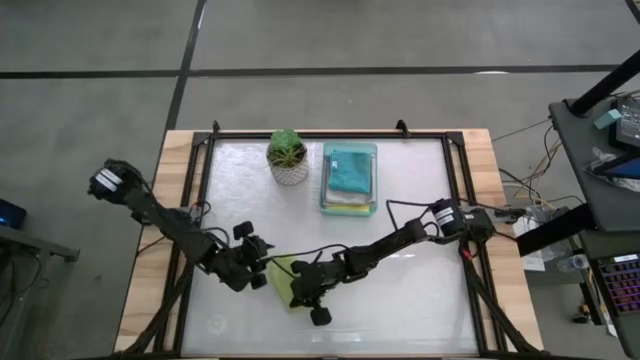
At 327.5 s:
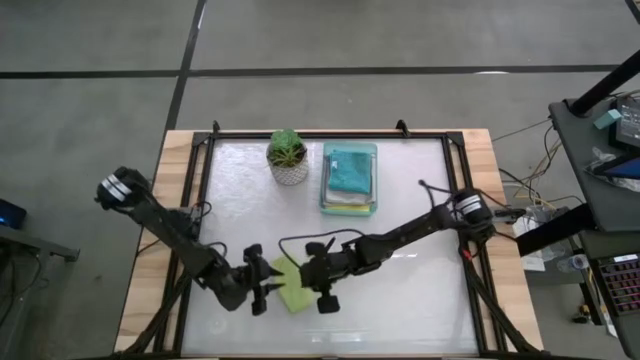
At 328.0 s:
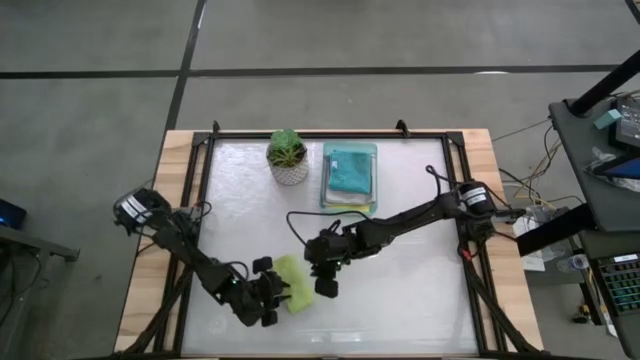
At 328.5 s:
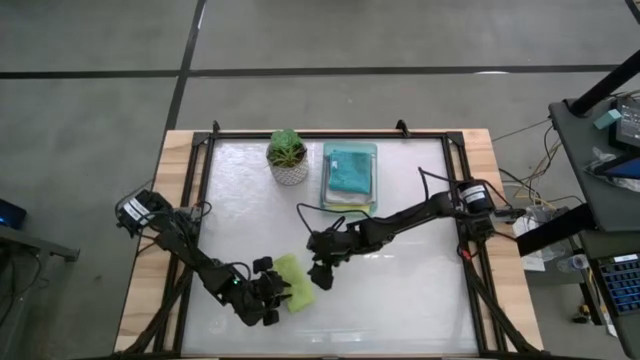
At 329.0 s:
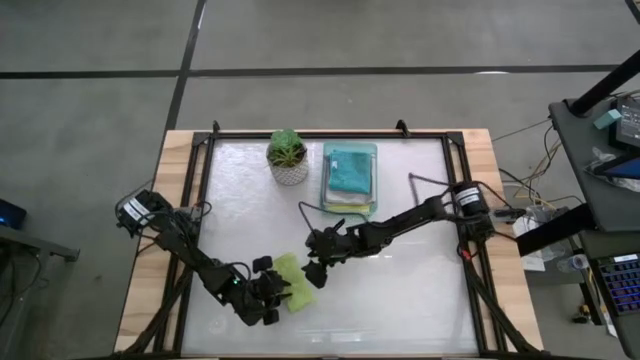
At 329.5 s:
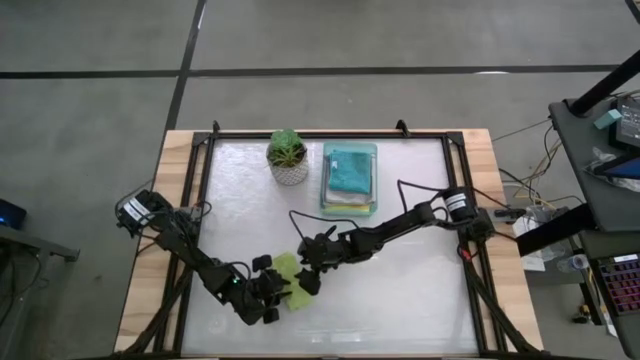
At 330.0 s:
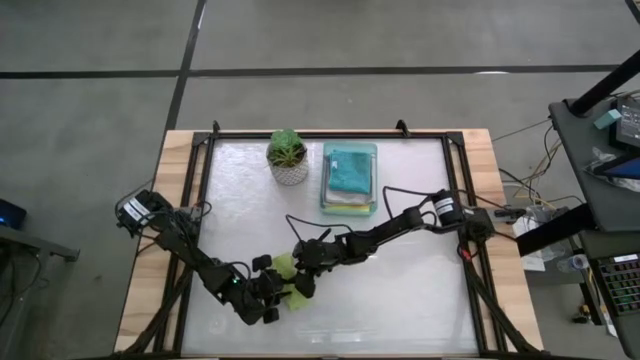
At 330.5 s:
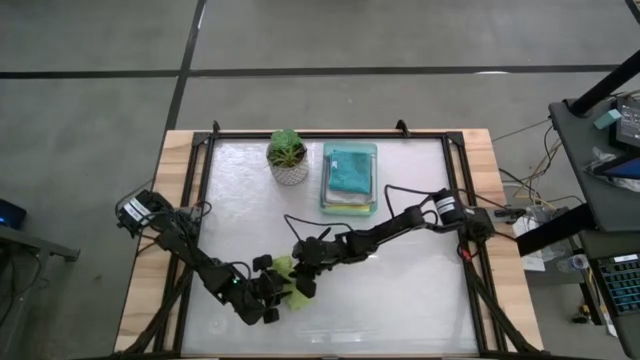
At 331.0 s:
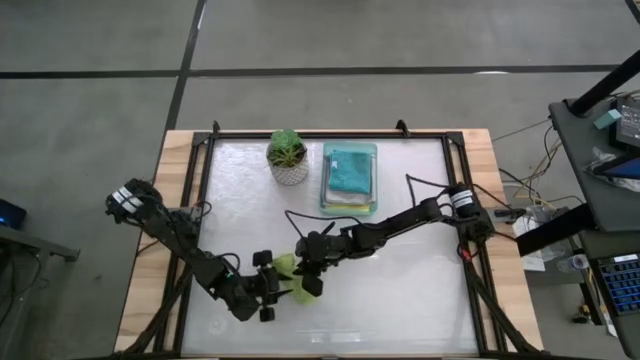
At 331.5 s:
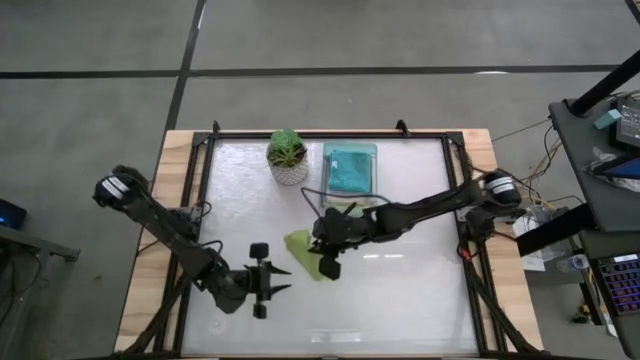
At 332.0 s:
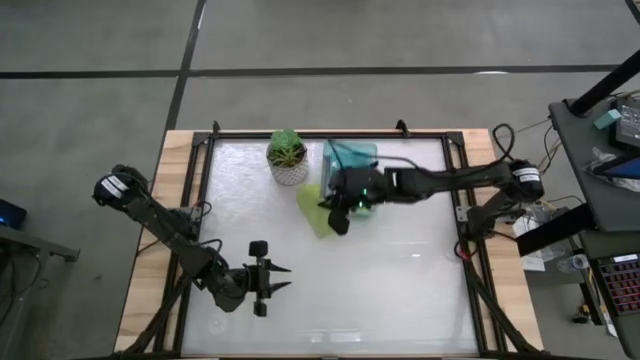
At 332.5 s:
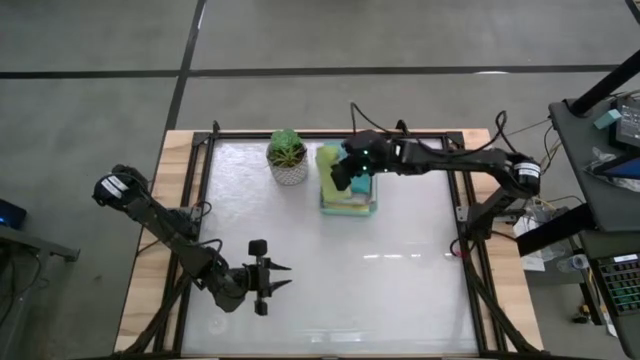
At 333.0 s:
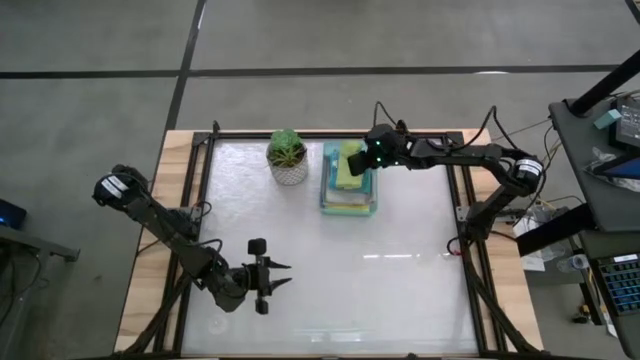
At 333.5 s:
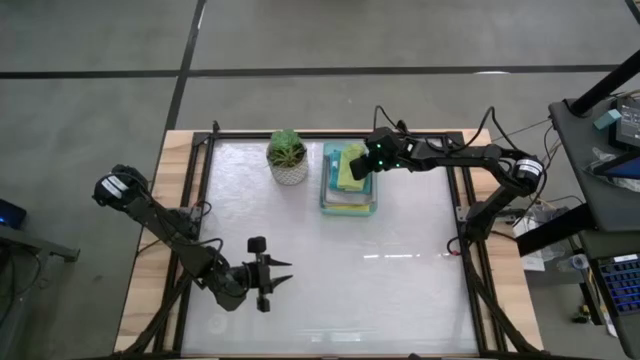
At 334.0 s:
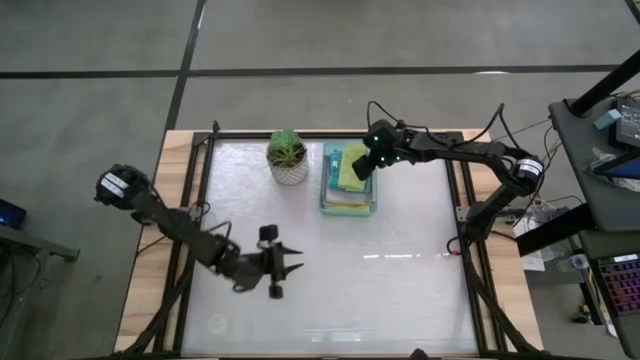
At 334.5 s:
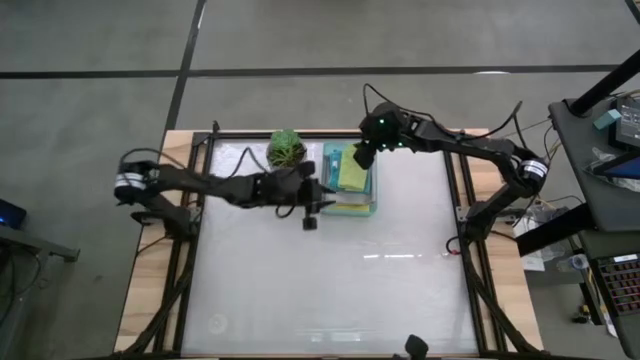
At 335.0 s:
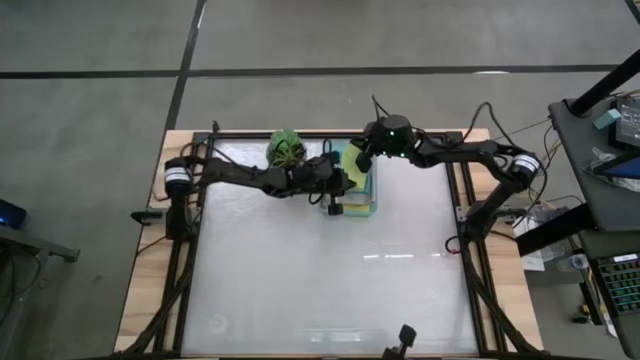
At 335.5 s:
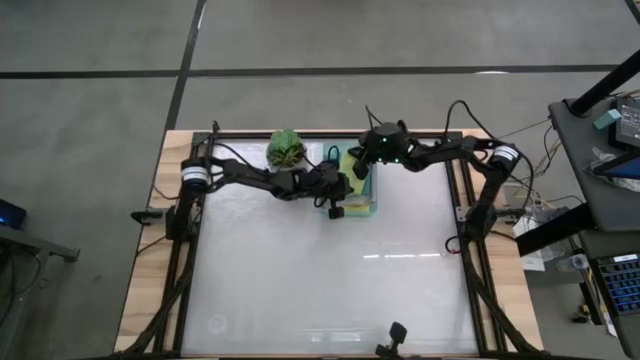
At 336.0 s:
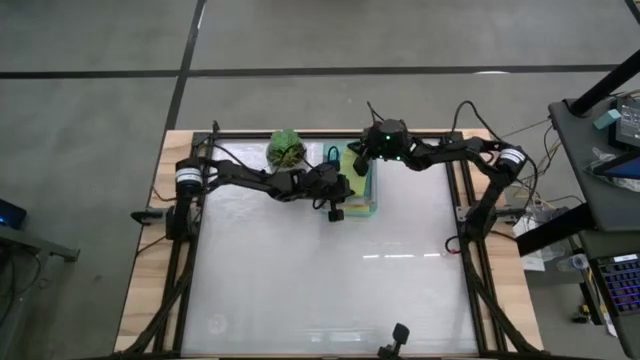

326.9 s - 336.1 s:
Task: Fold microfiber towels
Put the folded green microfiber cloth into the blue bin

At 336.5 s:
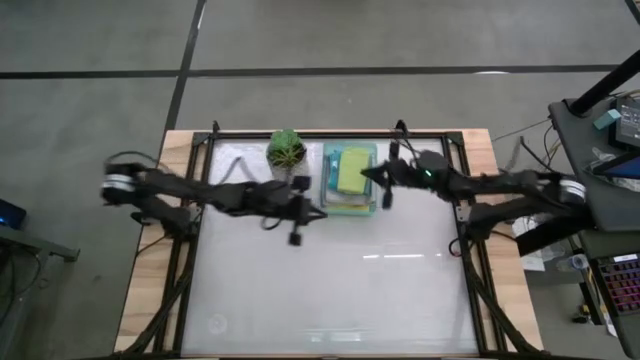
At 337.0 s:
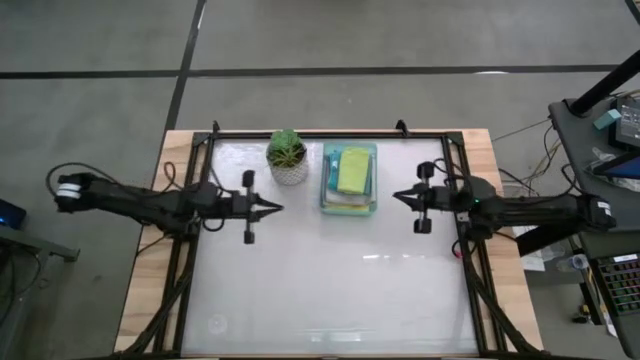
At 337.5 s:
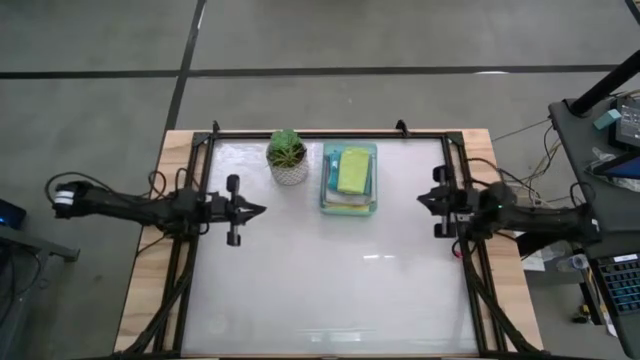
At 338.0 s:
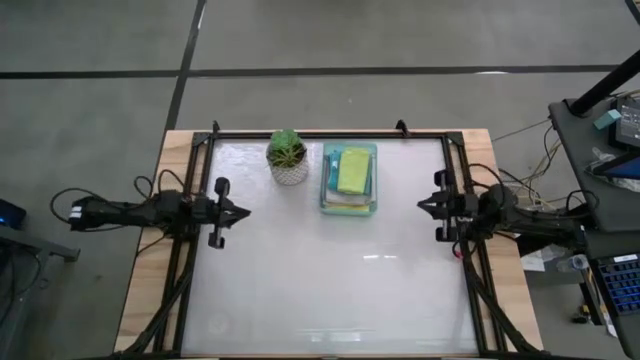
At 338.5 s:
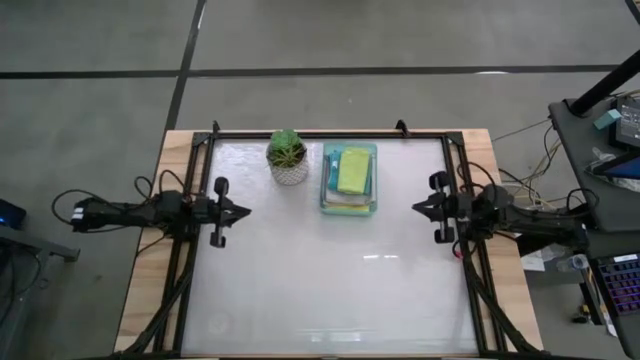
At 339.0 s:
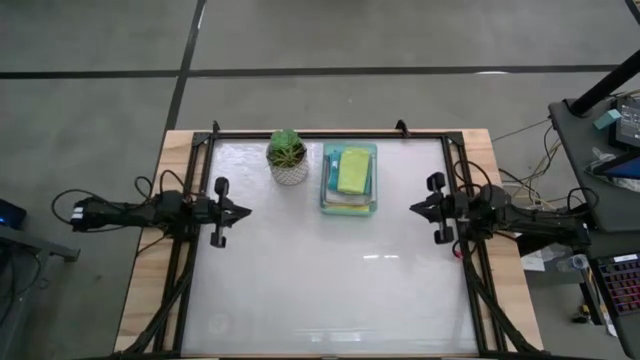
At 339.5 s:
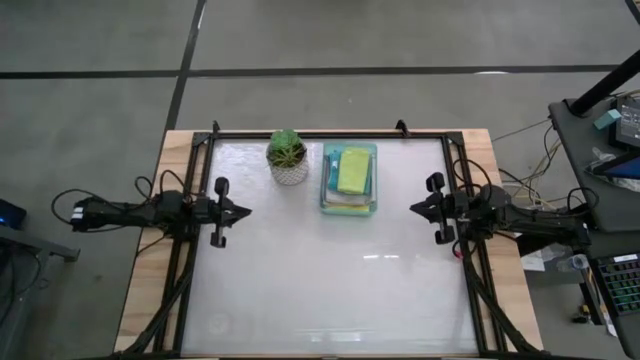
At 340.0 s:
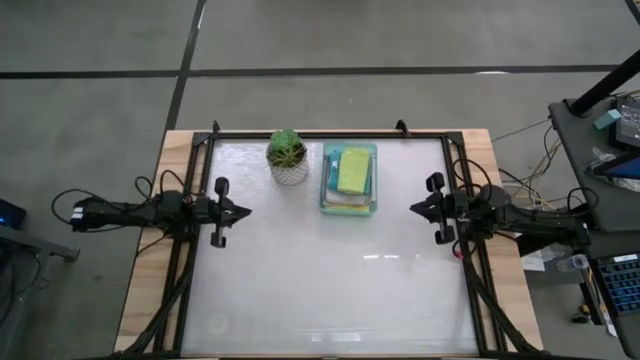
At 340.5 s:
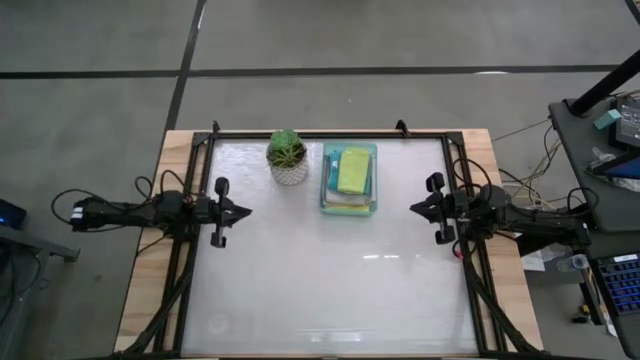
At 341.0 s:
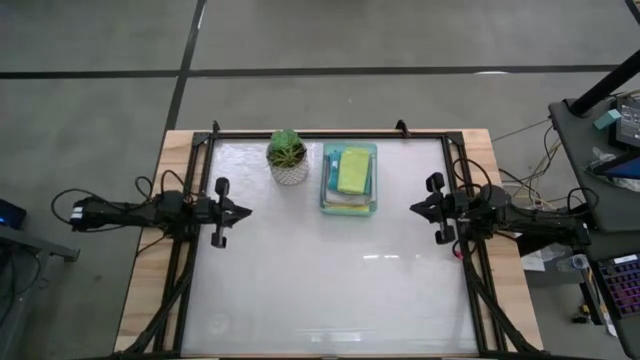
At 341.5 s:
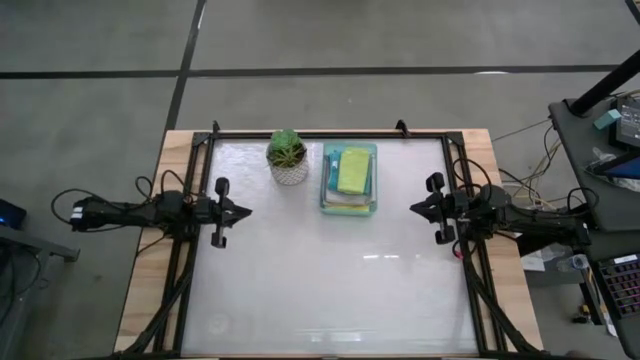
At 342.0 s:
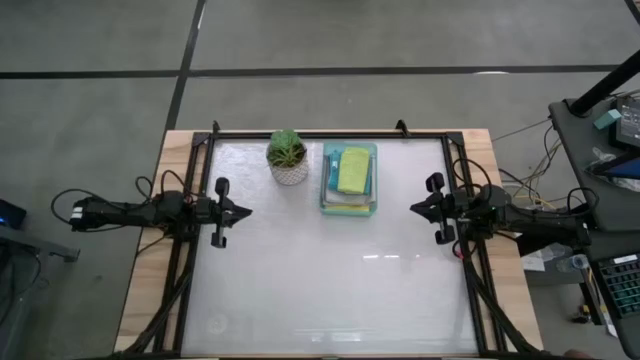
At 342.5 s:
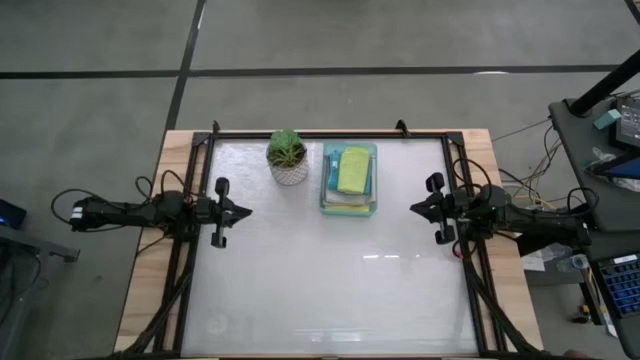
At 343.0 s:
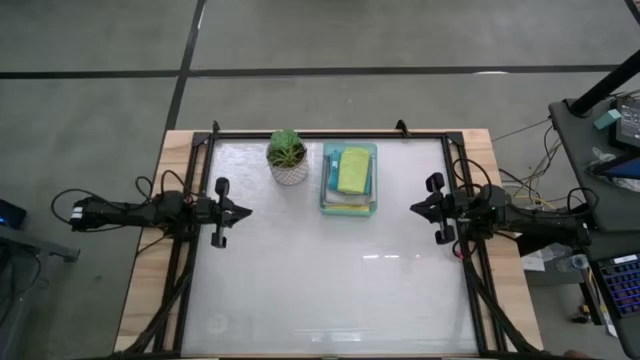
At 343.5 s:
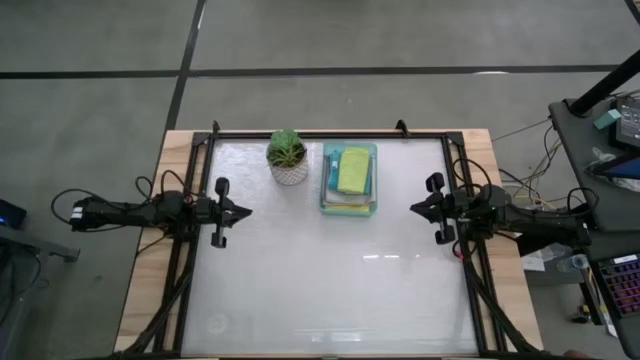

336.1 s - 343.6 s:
Return to Home Position

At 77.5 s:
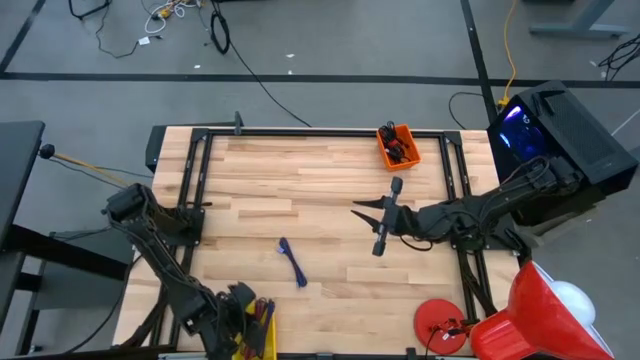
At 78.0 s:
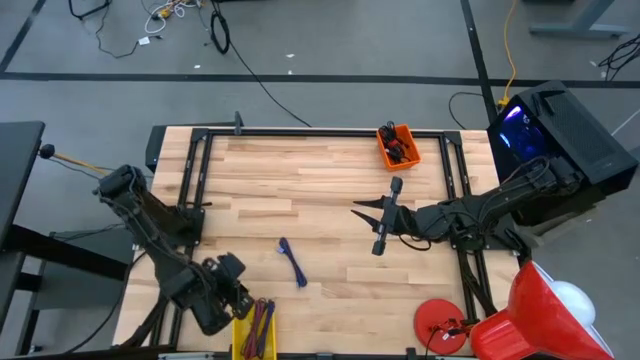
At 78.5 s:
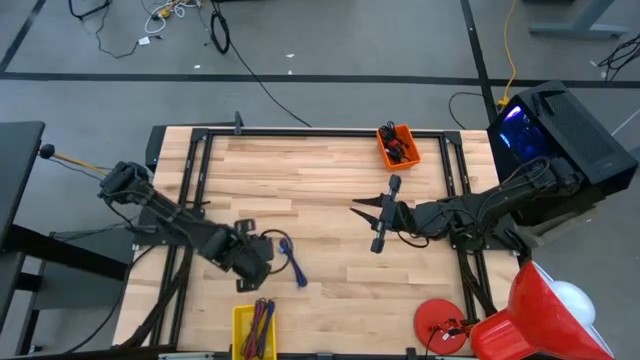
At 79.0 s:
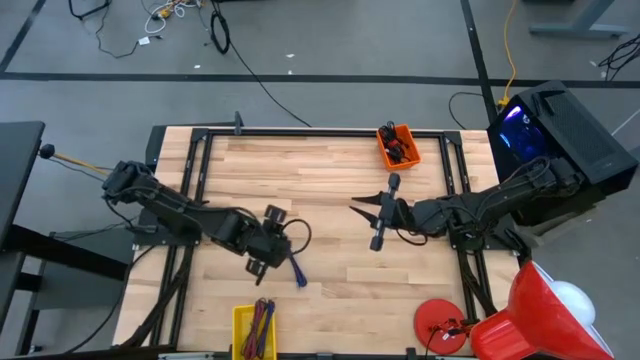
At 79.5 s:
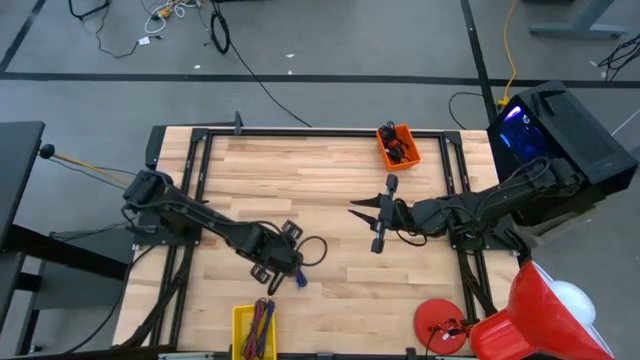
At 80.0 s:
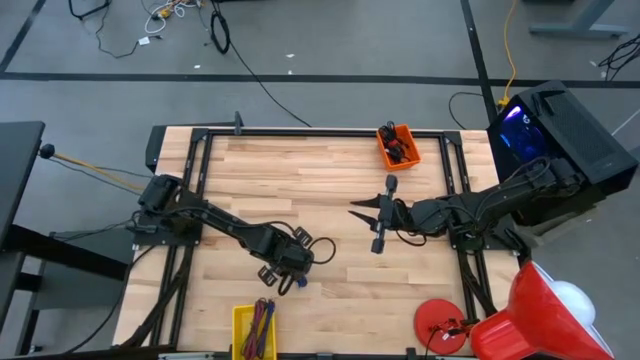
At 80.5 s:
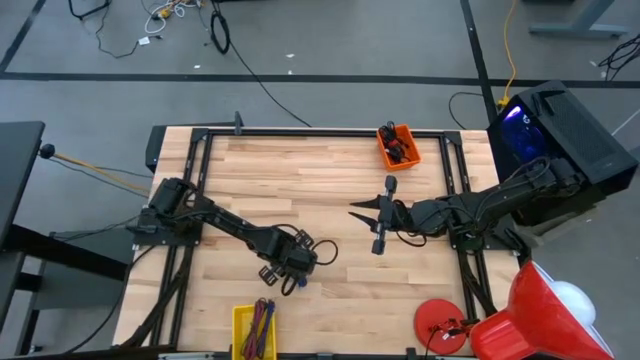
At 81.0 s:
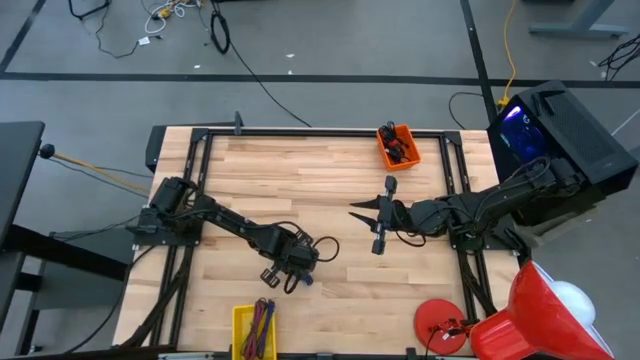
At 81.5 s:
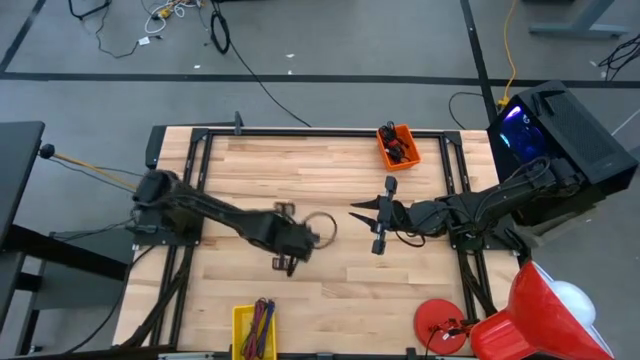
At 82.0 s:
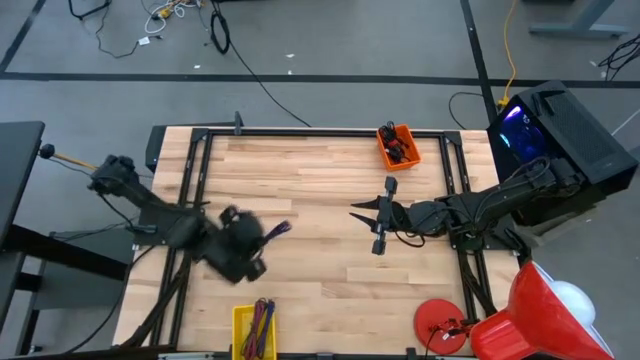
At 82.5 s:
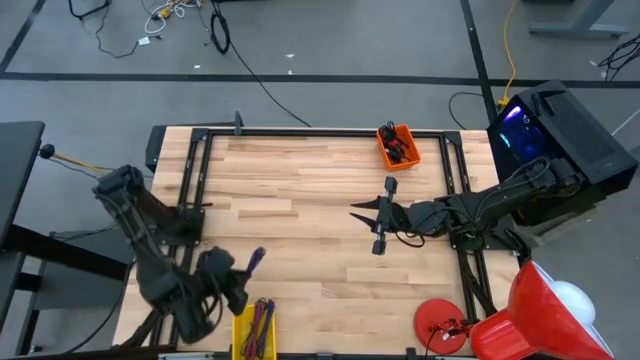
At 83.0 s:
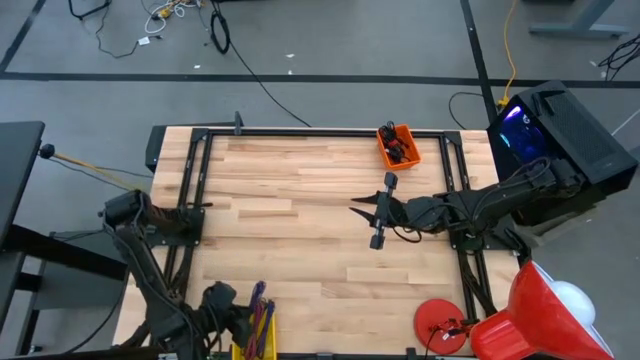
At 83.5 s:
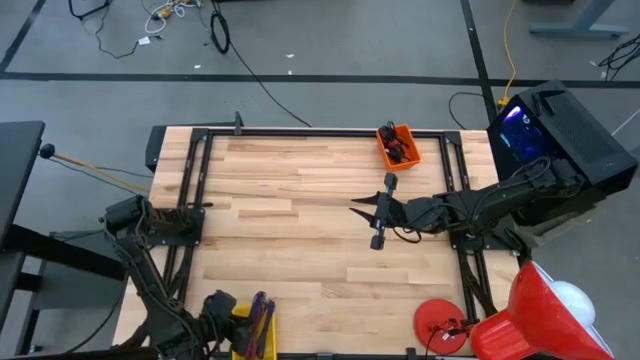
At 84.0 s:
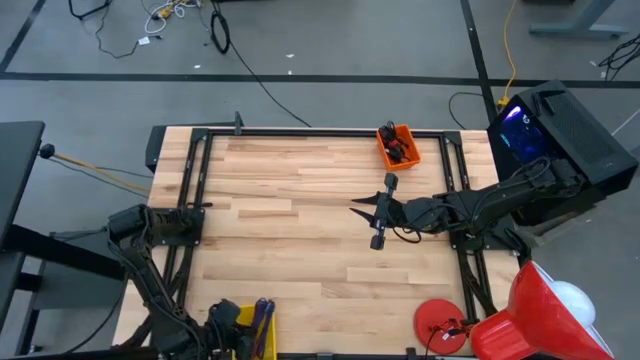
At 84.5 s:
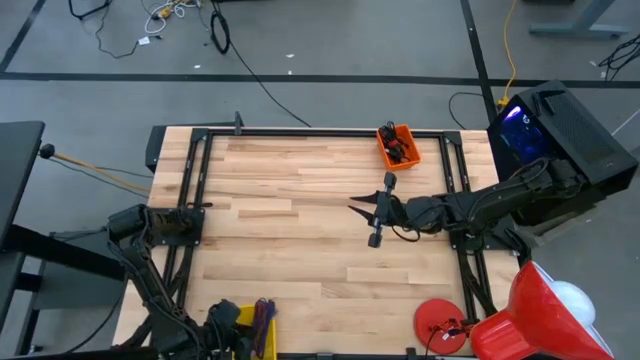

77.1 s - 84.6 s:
Task: Pick & Place USB Port
Put the blue and black charger cable into the yellow bin
